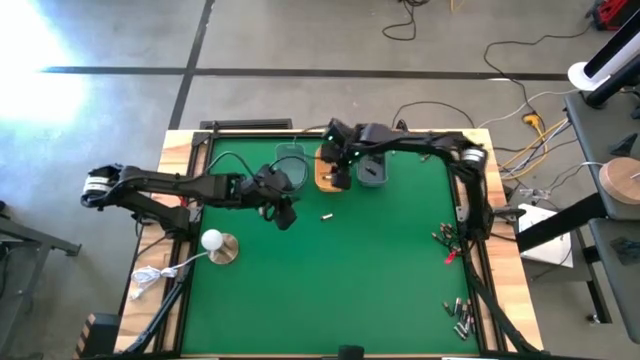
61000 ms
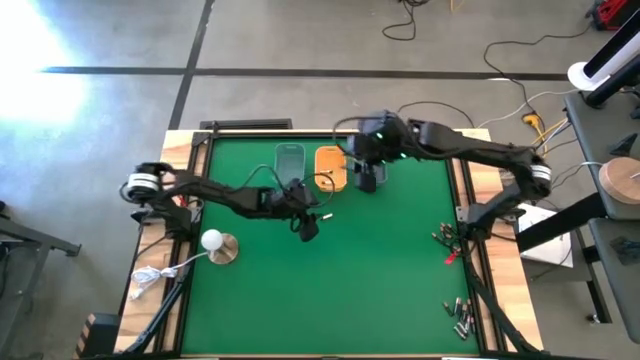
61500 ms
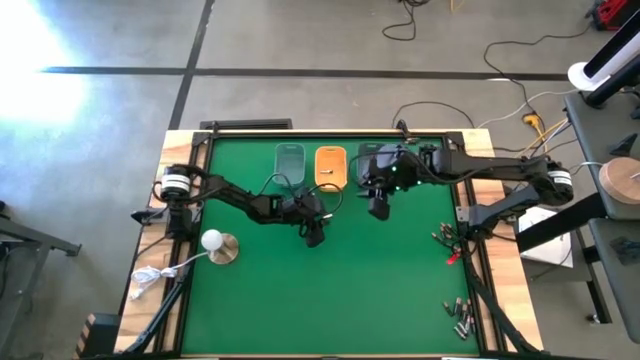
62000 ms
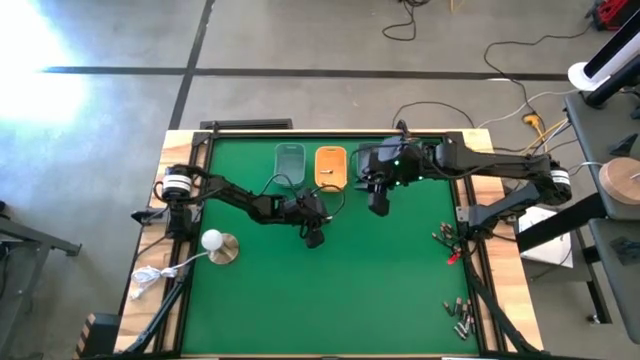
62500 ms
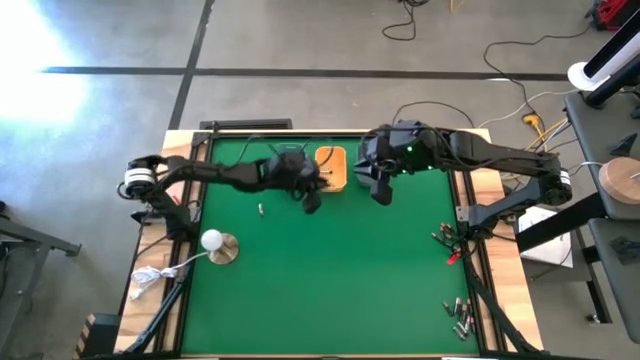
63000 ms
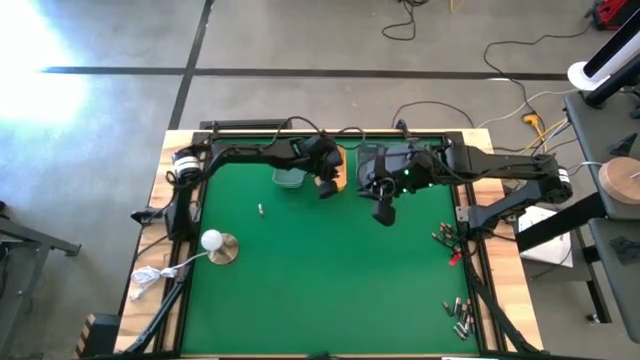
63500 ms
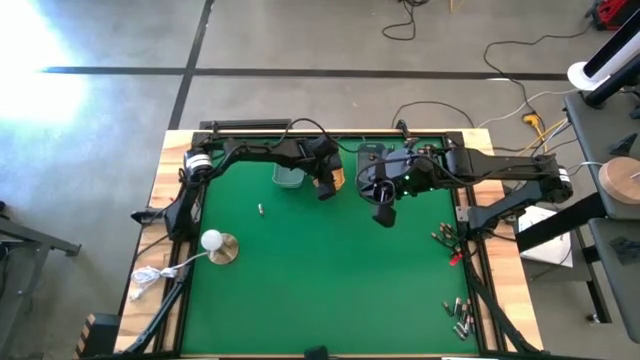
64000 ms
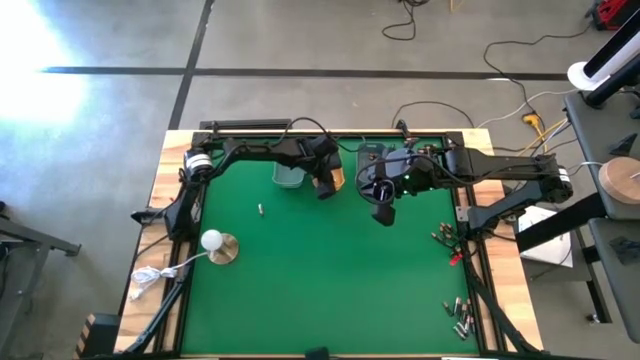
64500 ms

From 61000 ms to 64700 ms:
Task: Sort batteries
Put the silver battery into the yellow bin

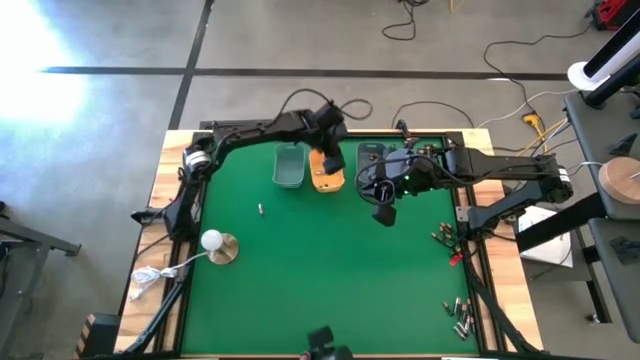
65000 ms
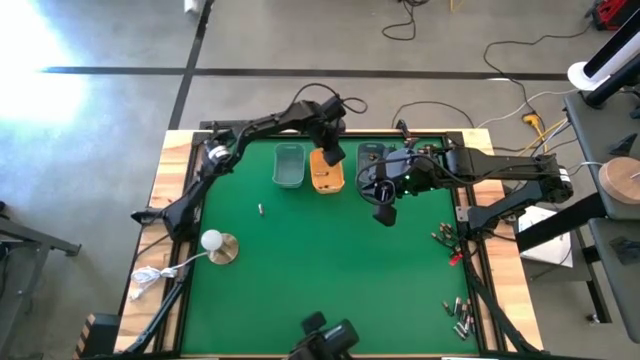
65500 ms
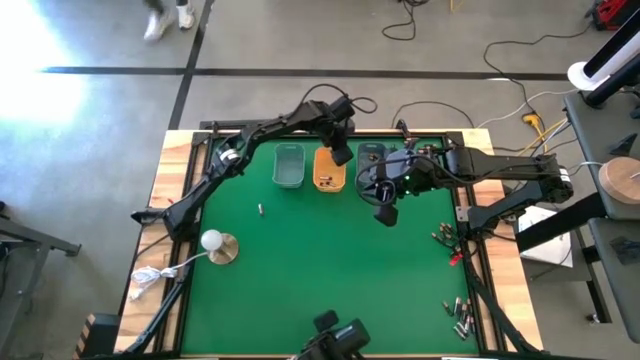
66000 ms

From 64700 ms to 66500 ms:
Adjust the yellow bin

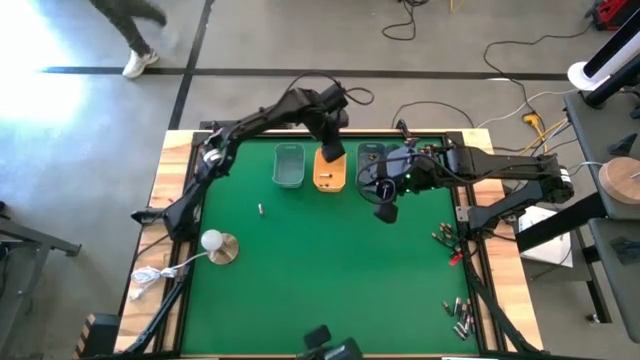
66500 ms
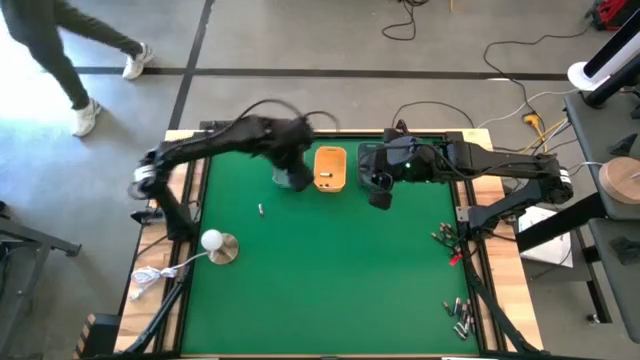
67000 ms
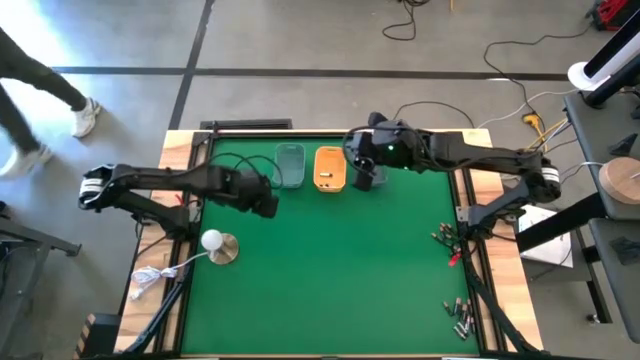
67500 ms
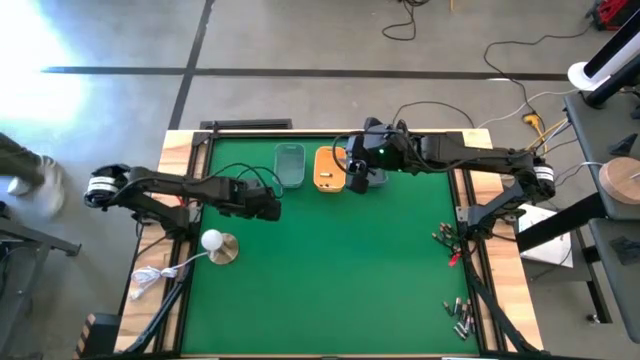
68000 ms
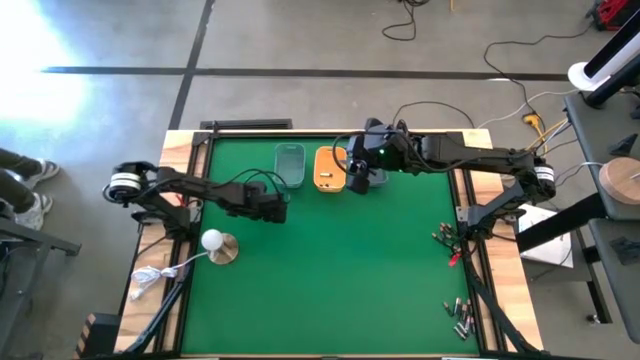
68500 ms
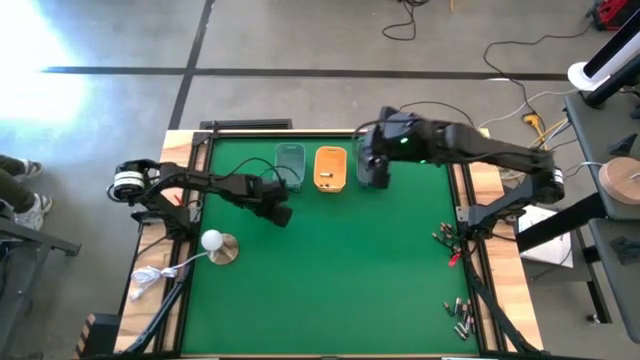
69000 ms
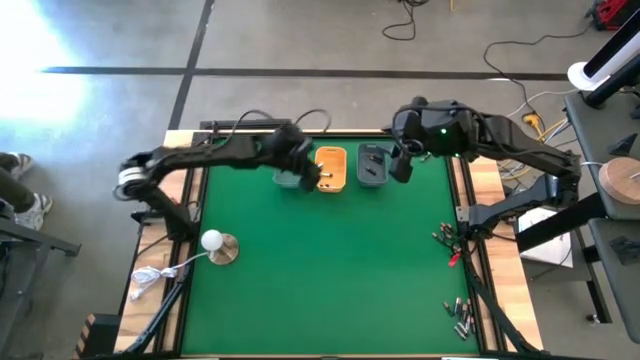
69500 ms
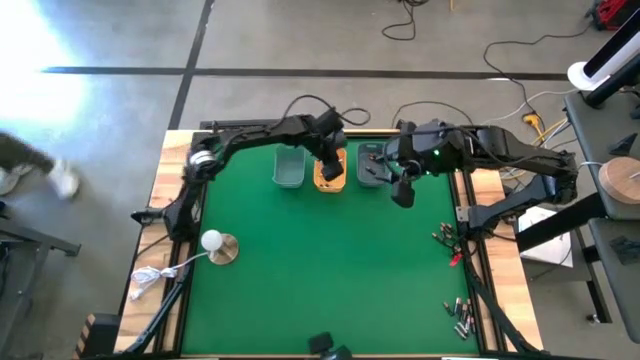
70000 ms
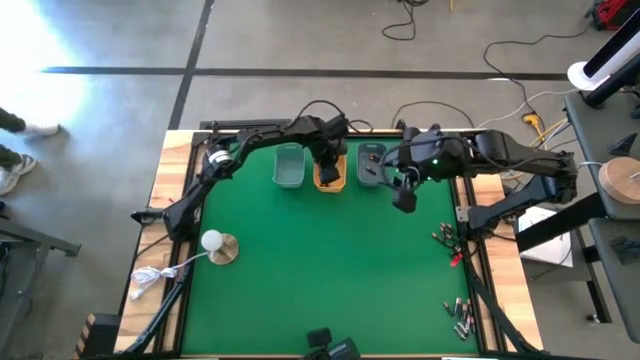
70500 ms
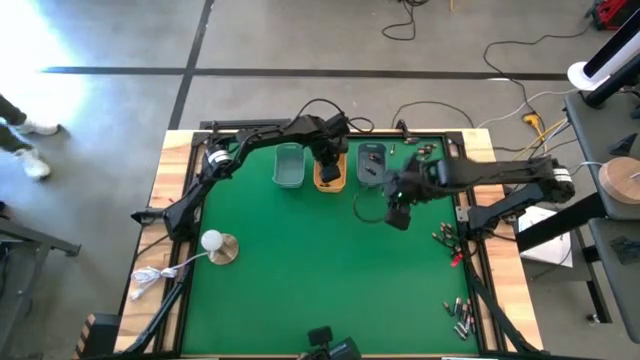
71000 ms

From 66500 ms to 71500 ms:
Put the silver battery into the yellow bin

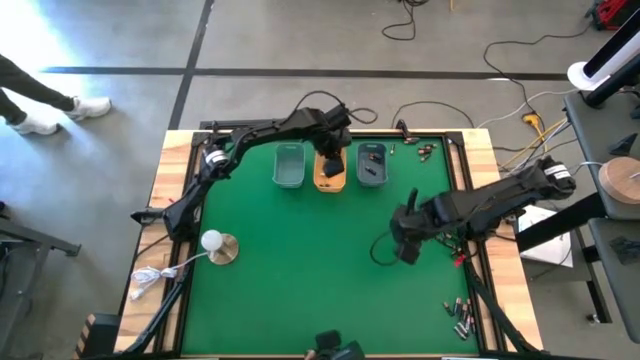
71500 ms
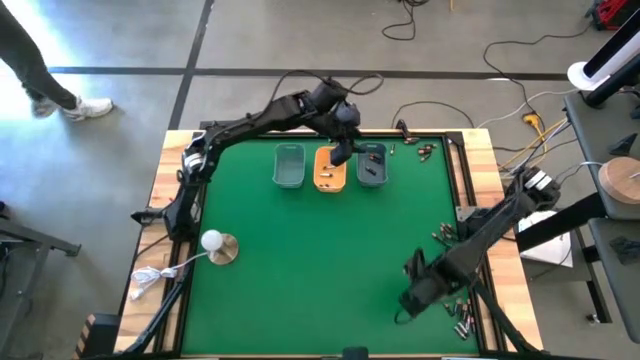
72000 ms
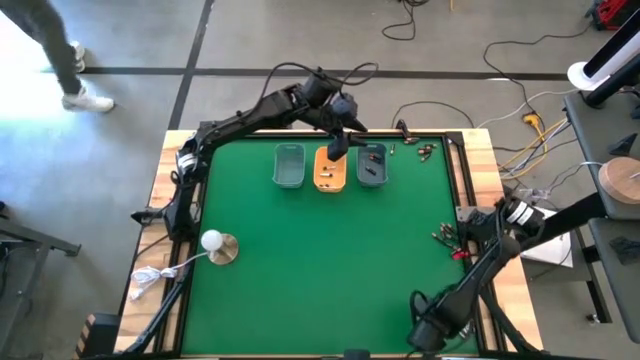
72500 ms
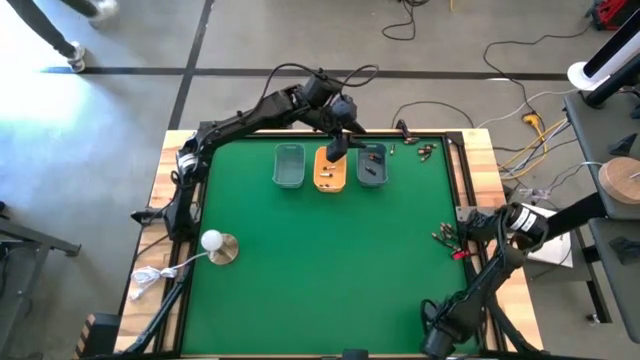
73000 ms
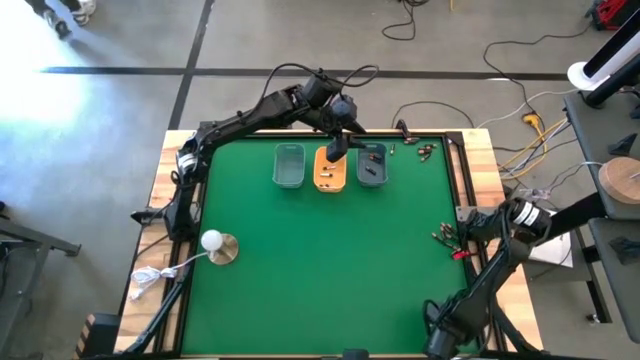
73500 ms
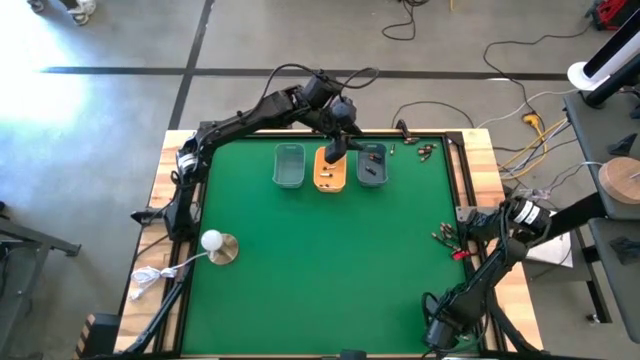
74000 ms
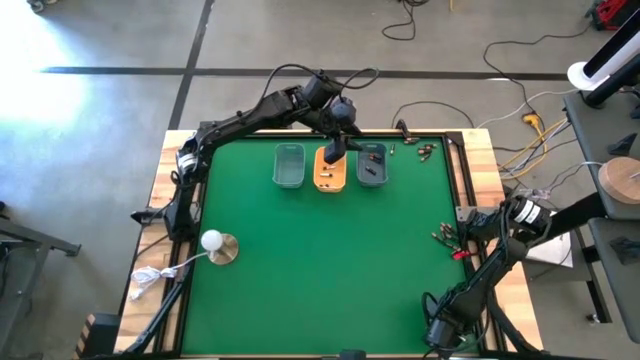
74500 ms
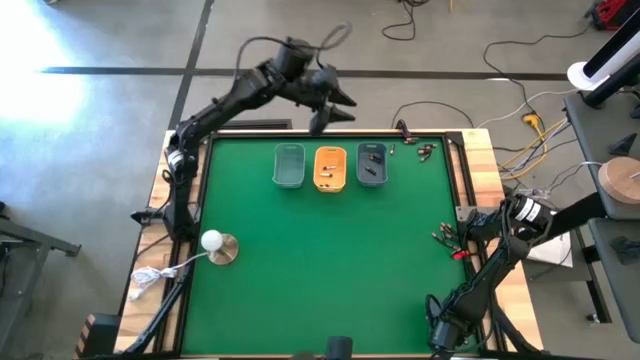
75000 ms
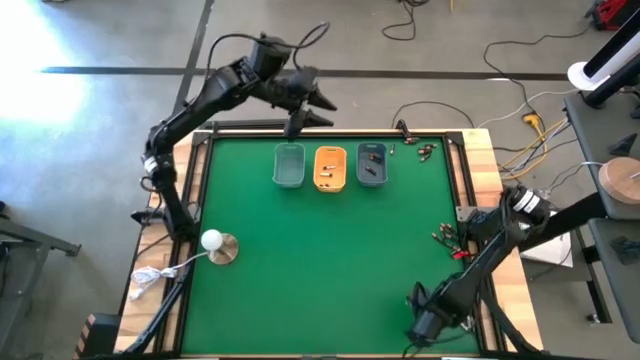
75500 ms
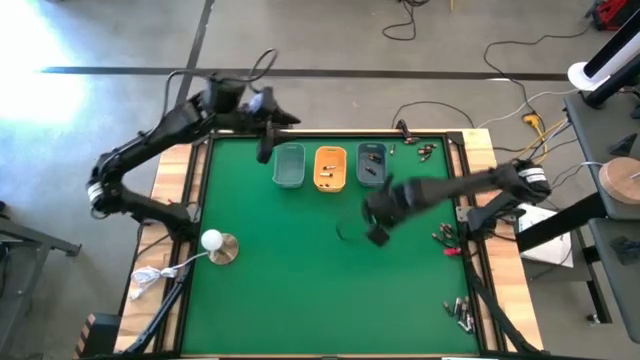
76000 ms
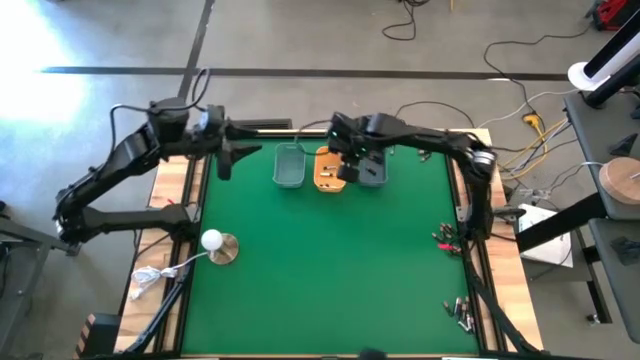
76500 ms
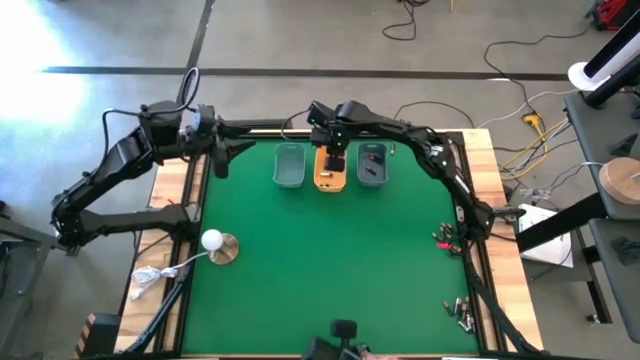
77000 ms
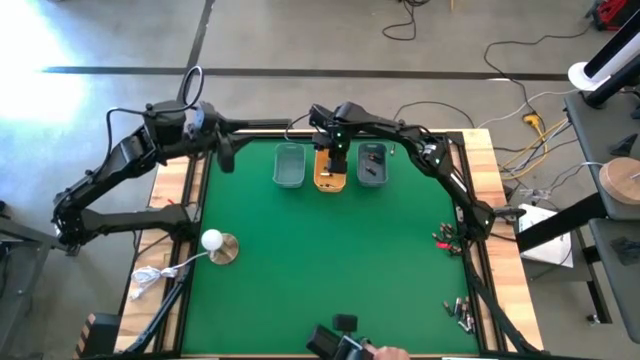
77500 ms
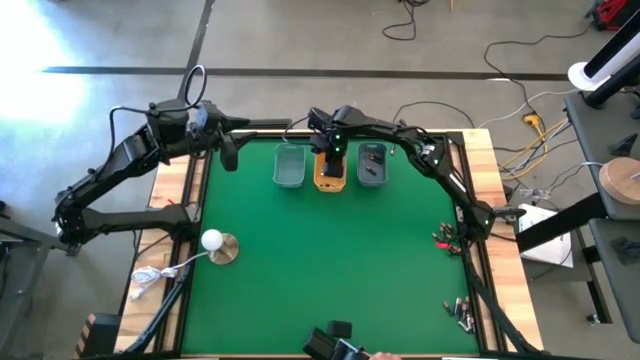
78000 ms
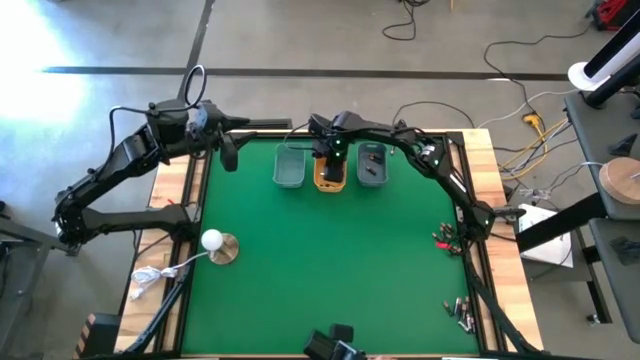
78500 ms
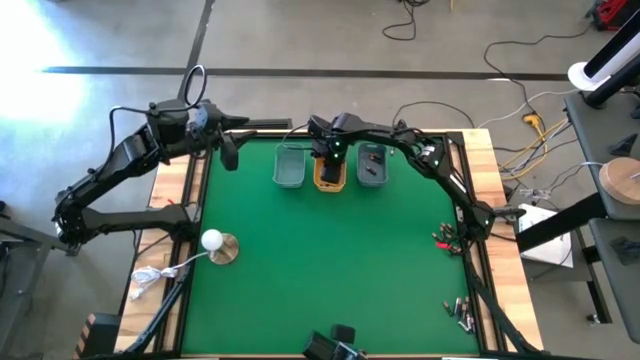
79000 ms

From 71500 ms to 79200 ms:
Put the silver battery into the yellow bin

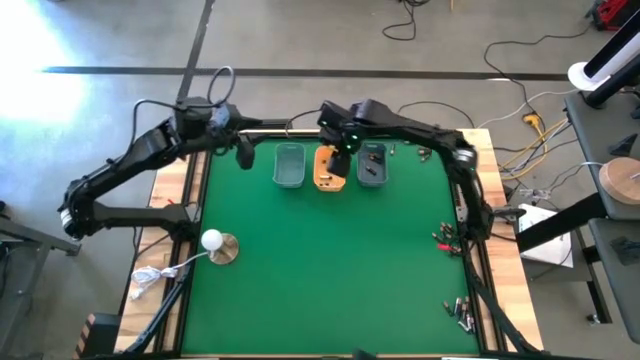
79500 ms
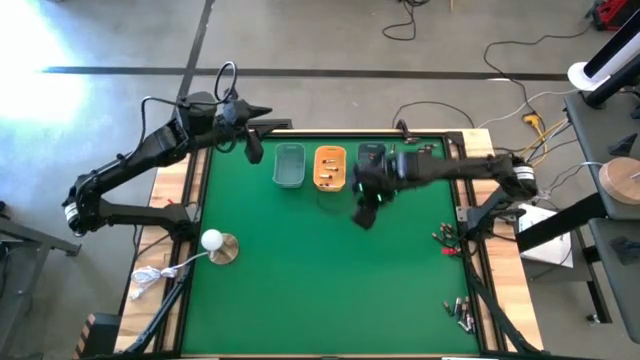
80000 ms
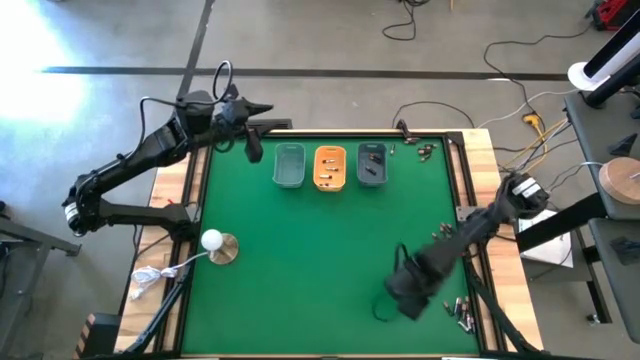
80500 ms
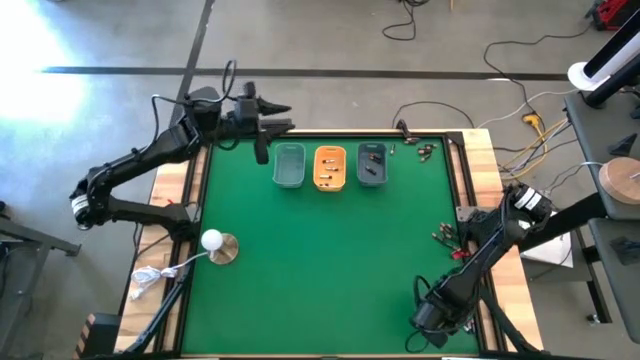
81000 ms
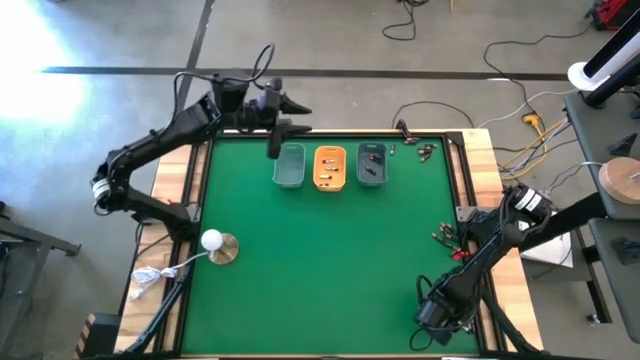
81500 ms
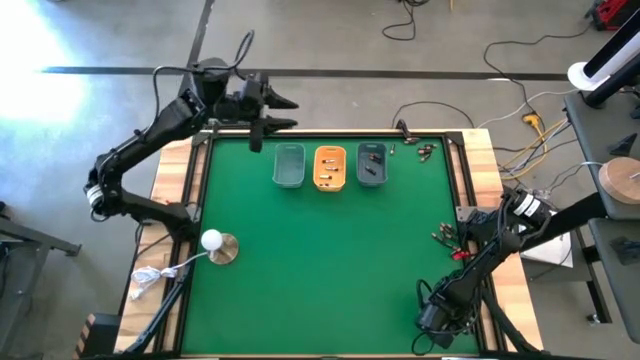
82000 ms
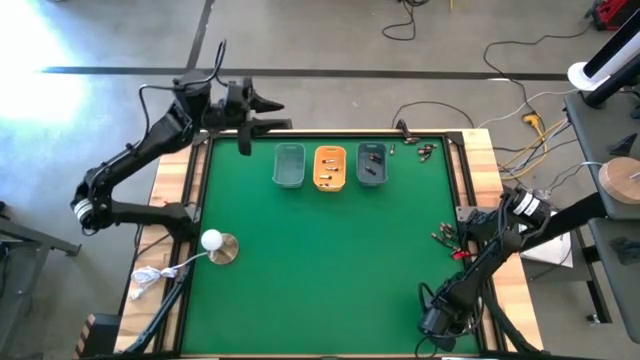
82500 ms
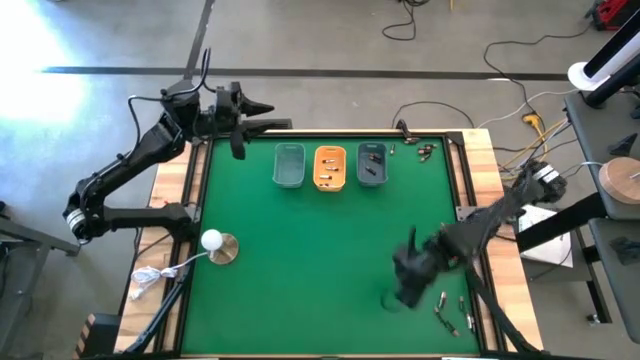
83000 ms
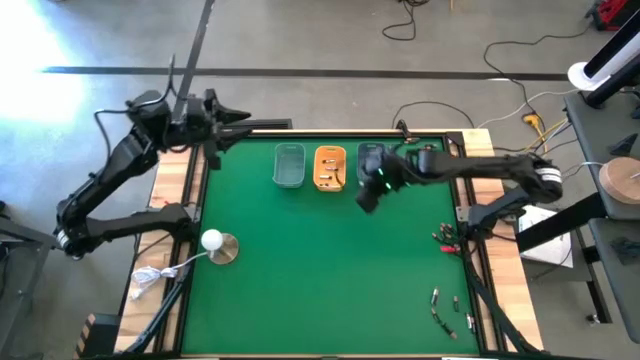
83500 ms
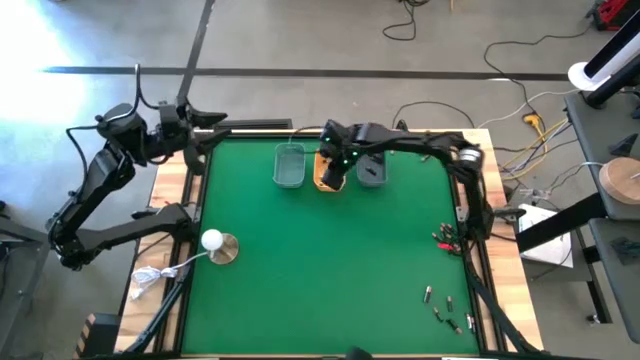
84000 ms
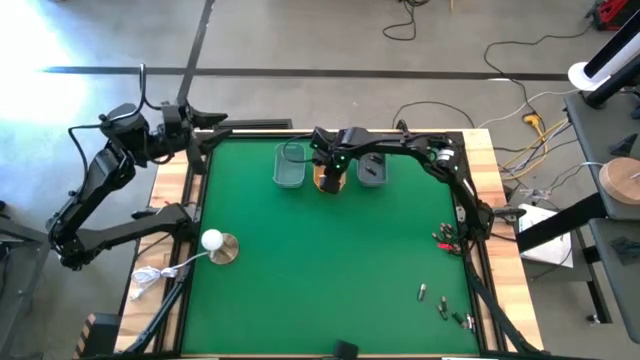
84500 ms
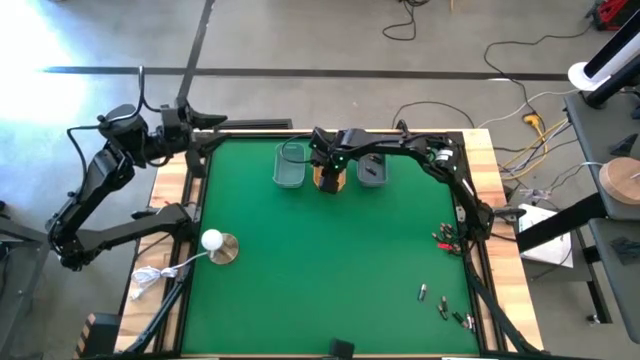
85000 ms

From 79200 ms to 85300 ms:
Put the silver battery into the yellow bin
